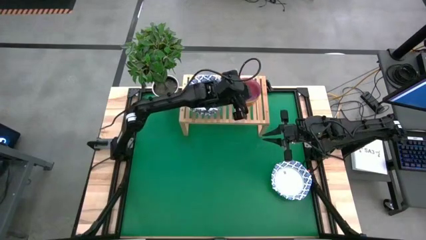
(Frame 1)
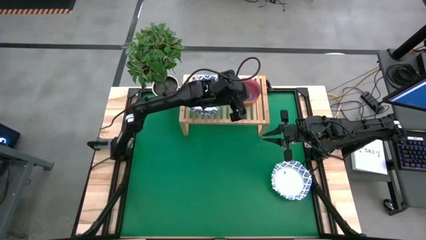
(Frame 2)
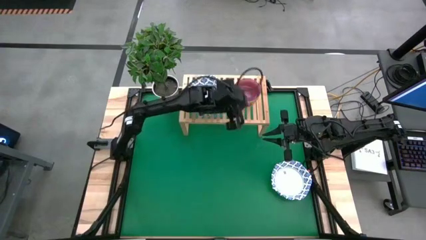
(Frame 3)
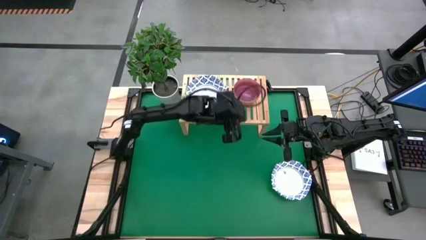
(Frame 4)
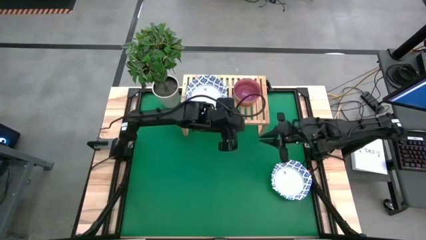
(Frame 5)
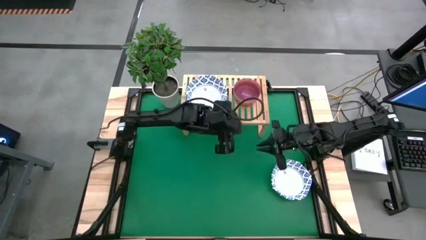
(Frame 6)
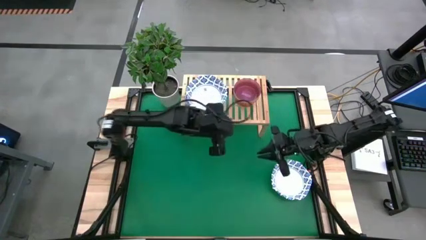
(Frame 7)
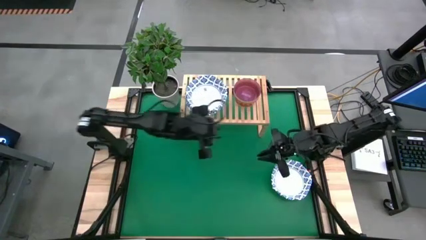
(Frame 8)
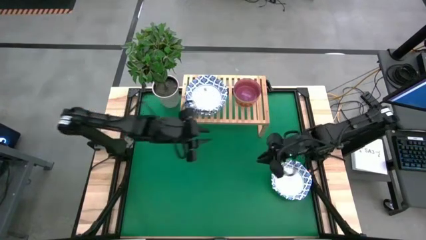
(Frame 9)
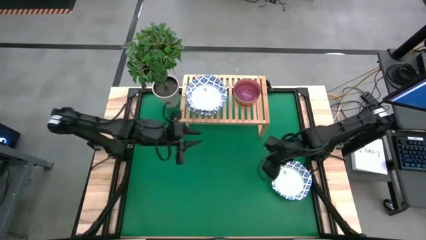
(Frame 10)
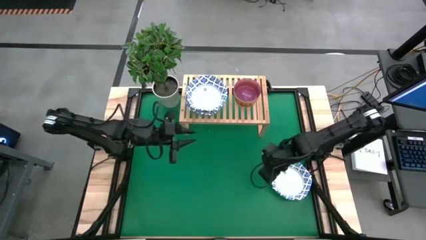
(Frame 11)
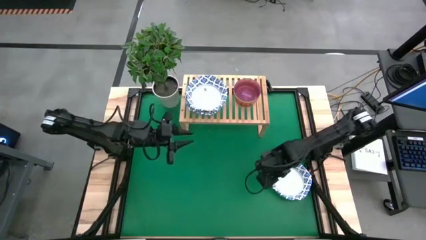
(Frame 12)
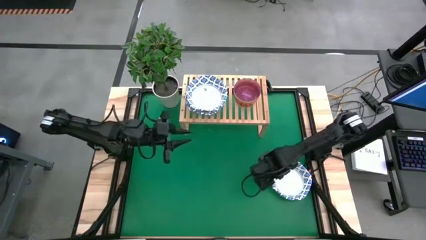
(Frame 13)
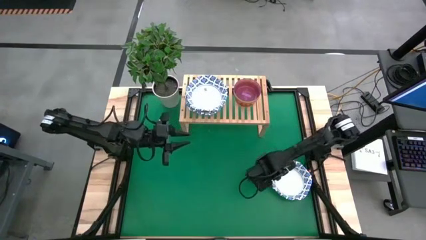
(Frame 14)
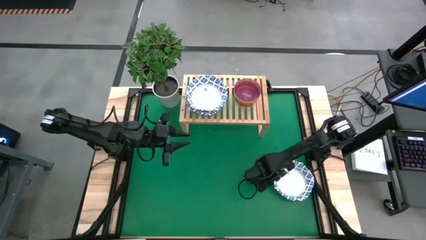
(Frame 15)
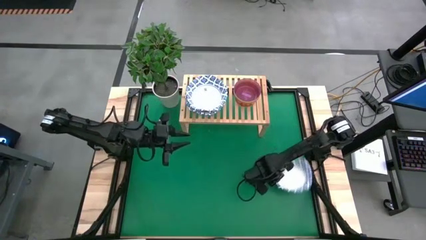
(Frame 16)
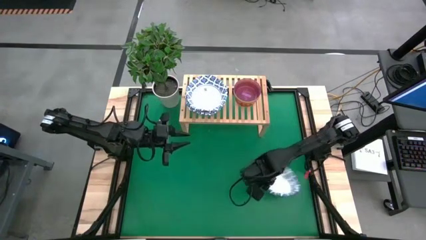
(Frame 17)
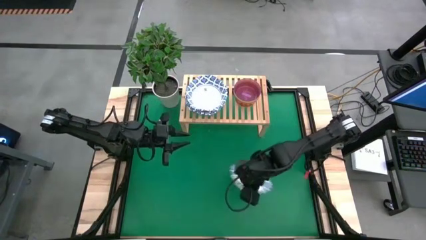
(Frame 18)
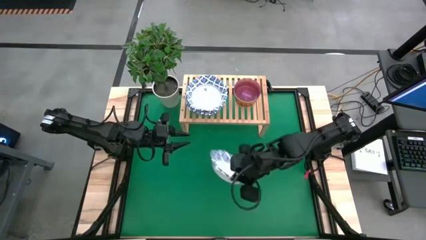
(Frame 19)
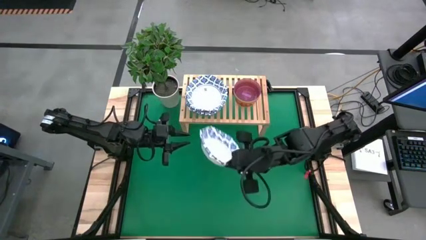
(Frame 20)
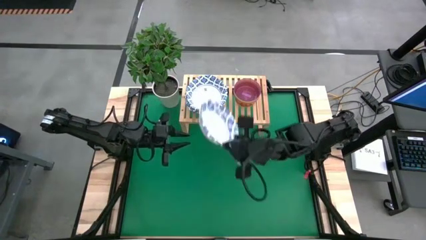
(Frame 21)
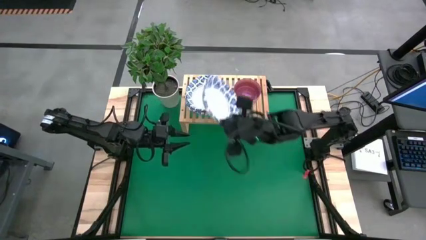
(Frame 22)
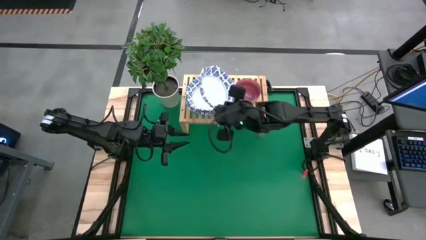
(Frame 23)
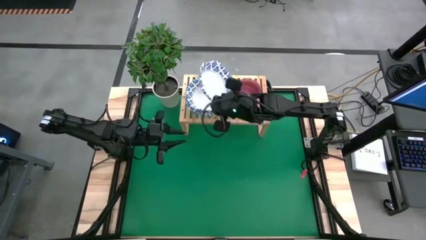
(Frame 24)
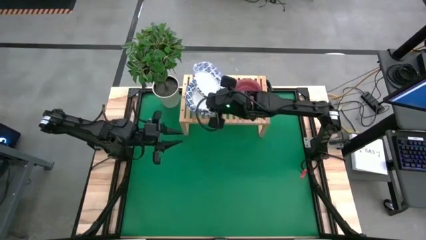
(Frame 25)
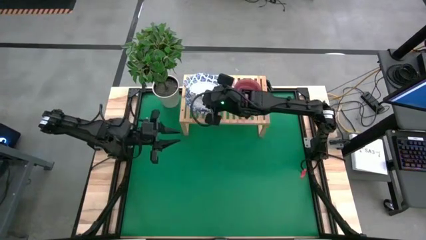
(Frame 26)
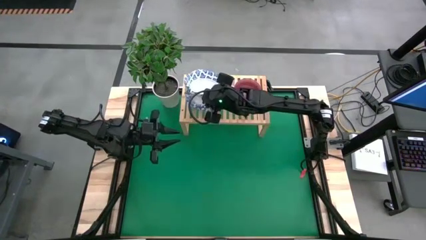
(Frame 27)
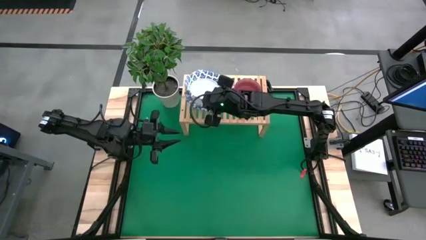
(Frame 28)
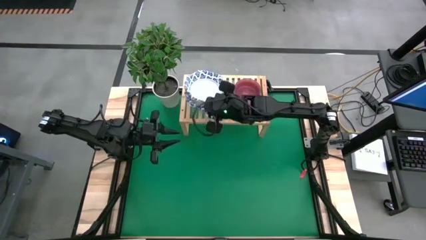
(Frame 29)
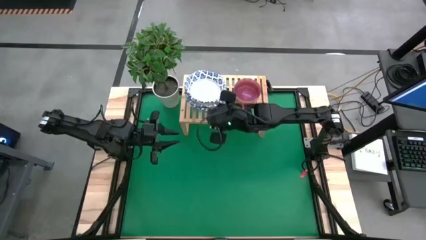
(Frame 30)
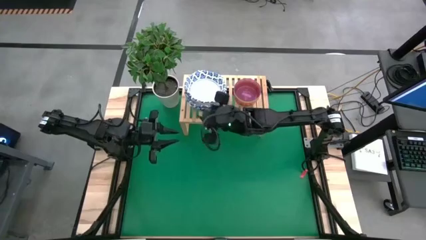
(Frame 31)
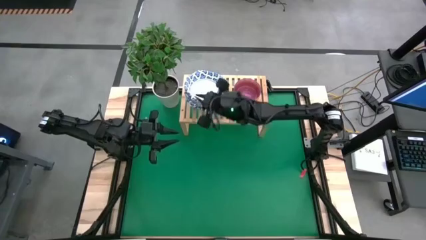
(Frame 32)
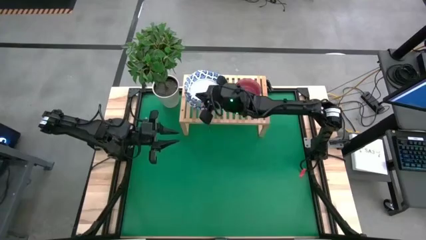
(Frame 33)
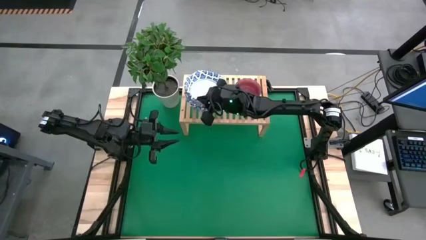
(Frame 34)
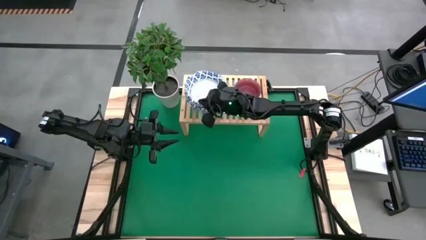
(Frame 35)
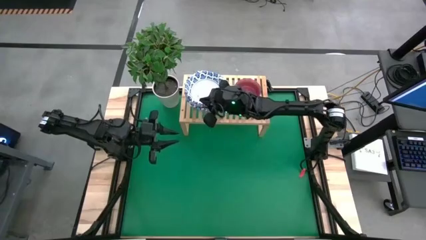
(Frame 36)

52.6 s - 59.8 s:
Task: Place and stack bowls onto a shelf
Stack the white bowl on top of the white bowl

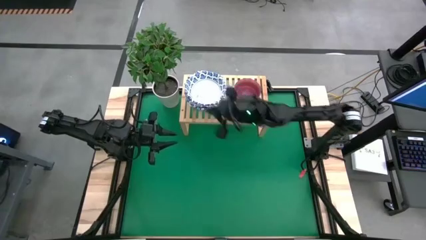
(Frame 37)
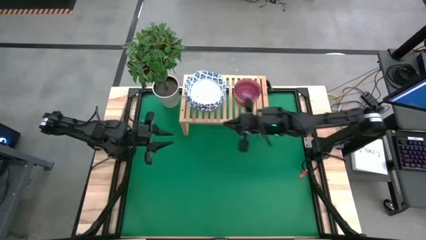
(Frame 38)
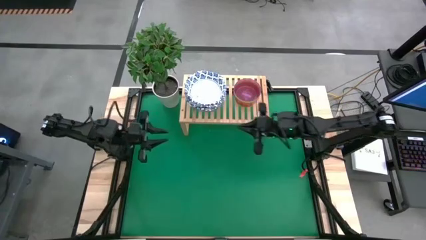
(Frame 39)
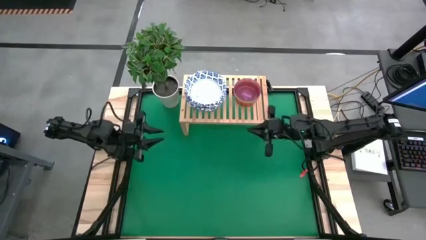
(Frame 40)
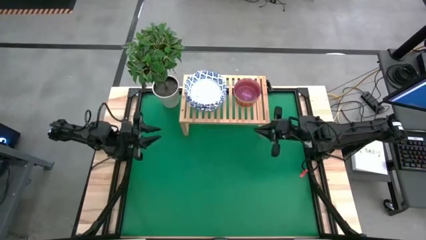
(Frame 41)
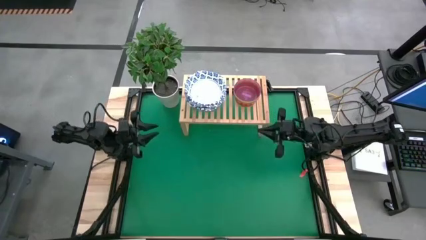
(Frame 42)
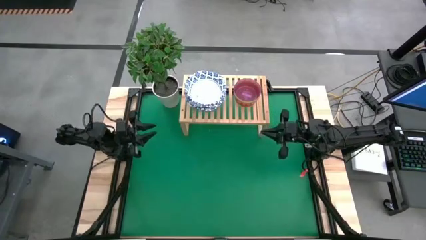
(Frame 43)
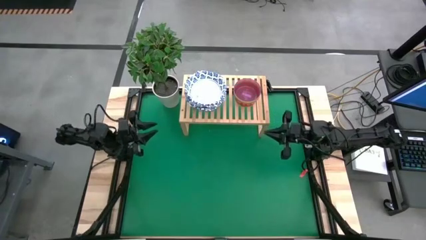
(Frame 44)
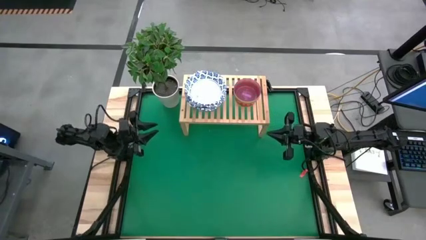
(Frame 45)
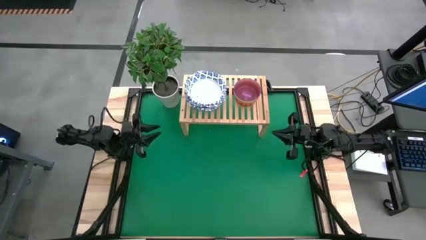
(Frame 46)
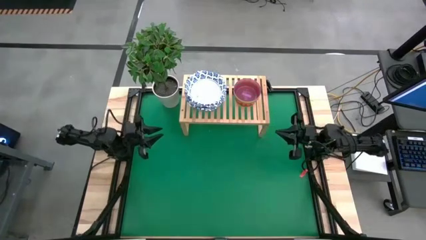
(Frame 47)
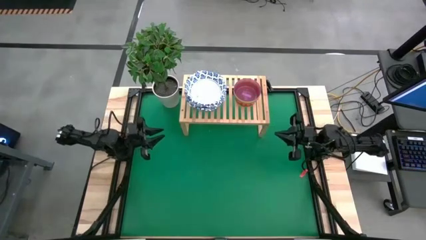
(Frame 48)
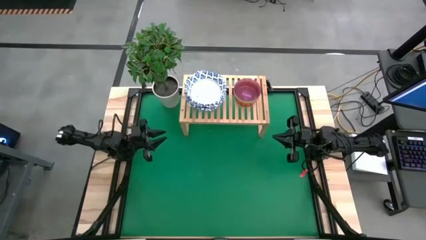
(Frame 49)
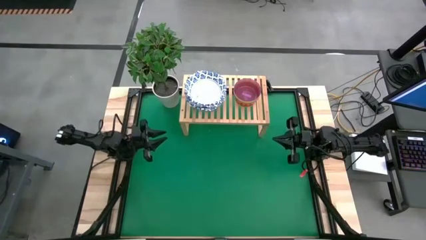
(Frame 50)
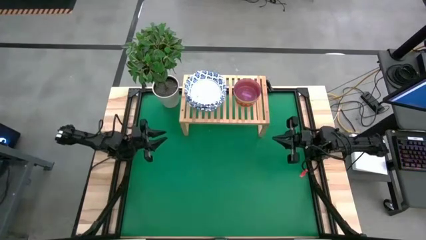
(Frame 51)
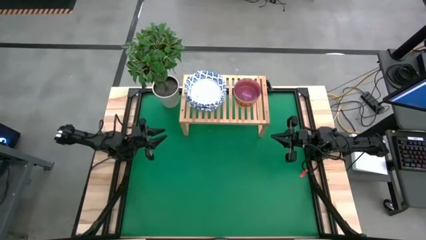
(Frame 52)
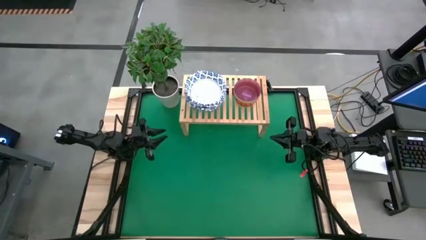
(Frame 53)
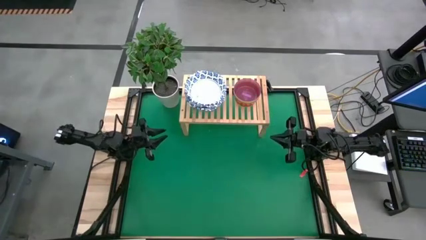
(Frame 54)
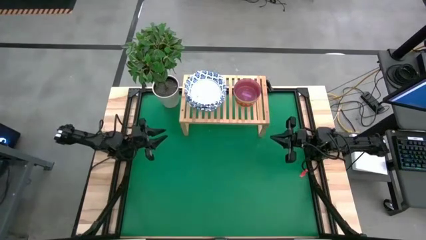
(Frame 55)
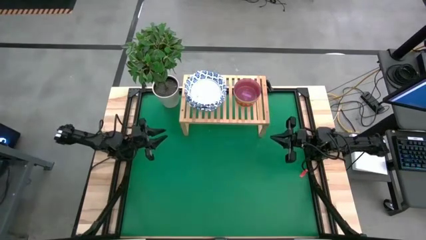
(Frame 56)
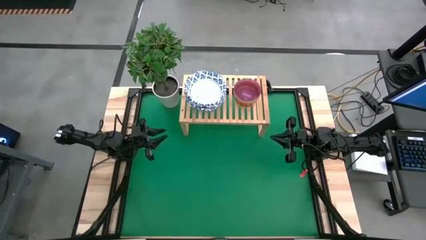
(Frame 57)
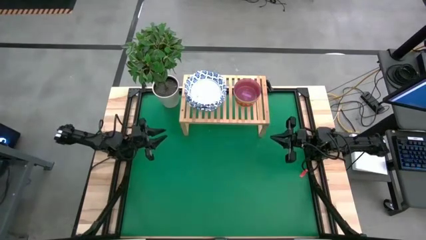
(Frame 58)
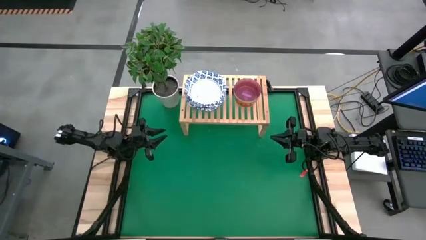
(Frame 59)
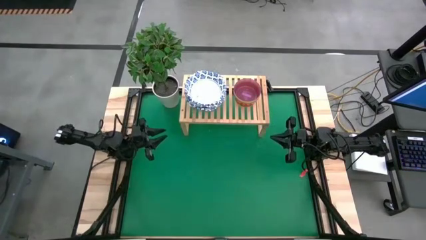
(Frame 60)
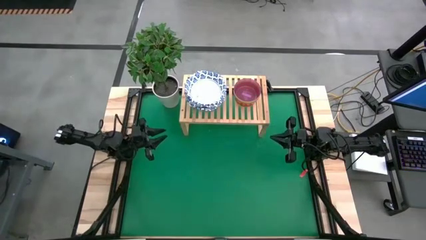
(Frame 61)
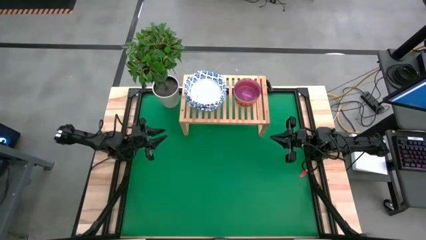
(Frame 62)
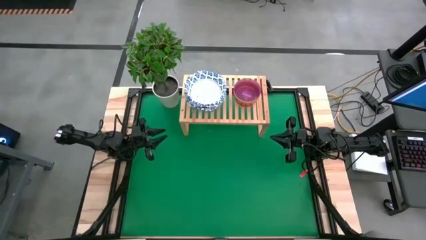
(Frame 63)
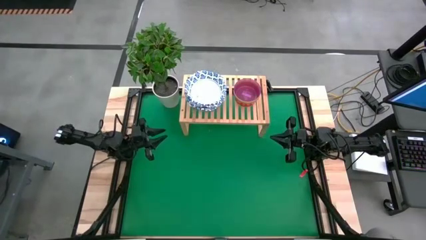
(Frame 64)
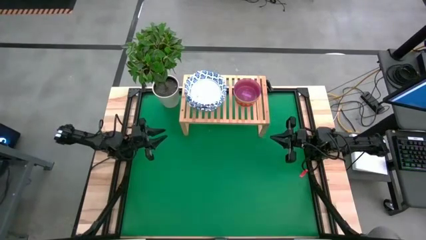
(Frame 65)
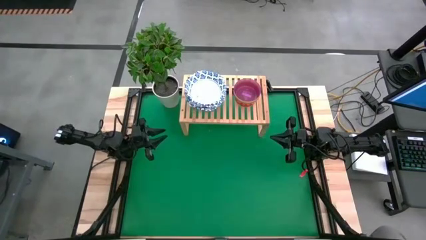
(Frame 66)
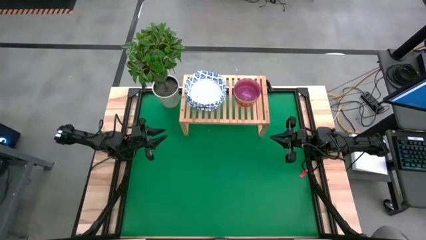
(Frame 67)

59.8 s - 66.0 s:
Return to Home Position

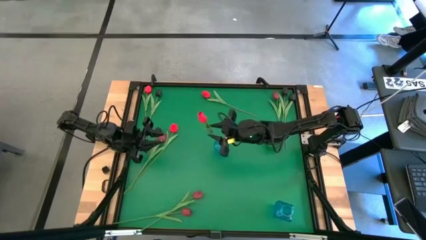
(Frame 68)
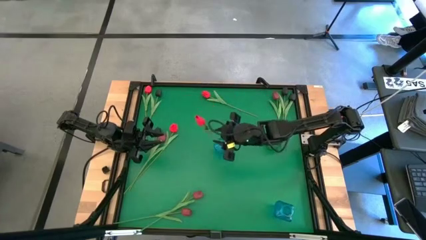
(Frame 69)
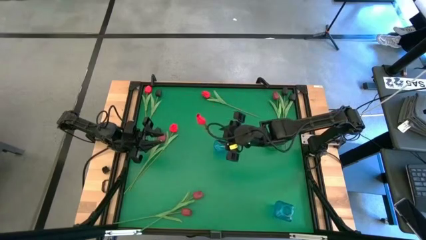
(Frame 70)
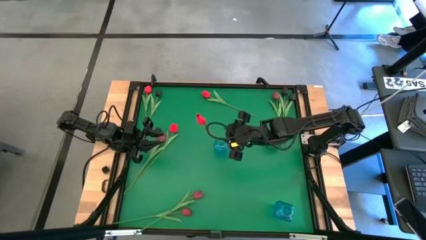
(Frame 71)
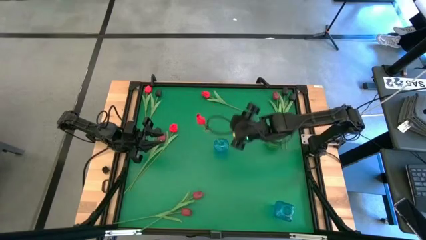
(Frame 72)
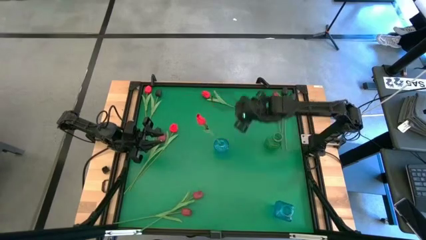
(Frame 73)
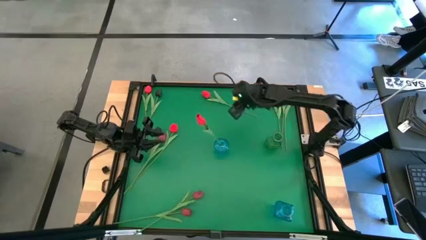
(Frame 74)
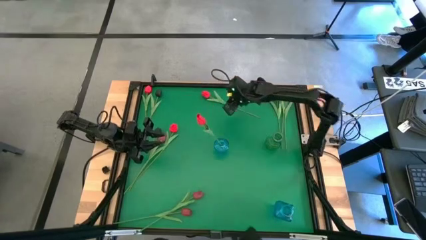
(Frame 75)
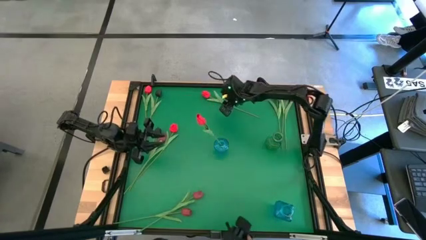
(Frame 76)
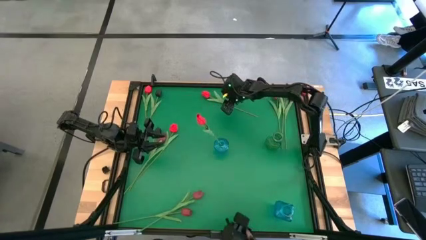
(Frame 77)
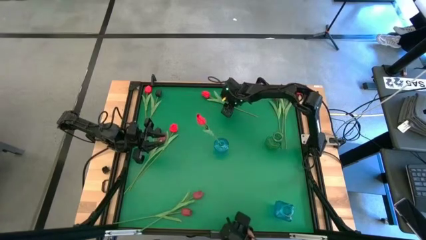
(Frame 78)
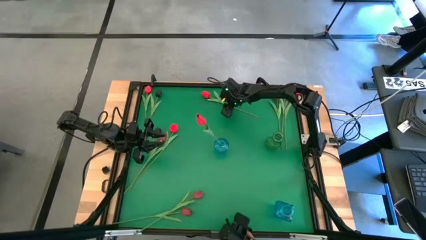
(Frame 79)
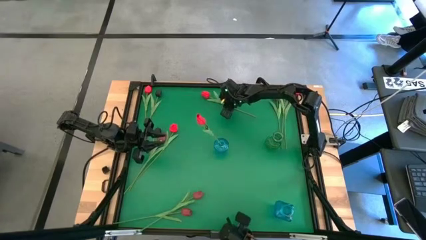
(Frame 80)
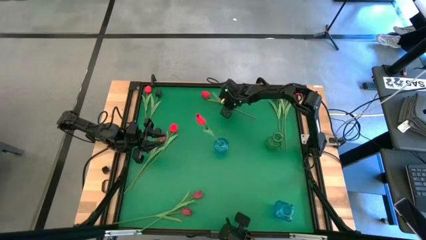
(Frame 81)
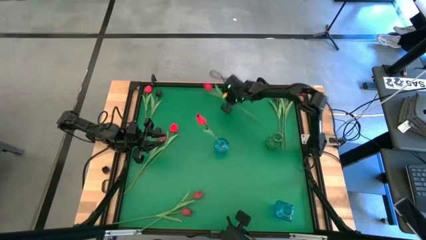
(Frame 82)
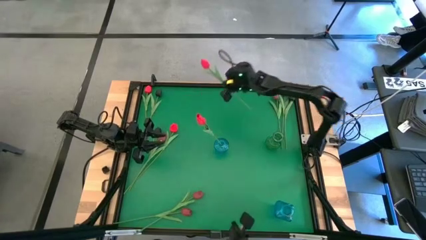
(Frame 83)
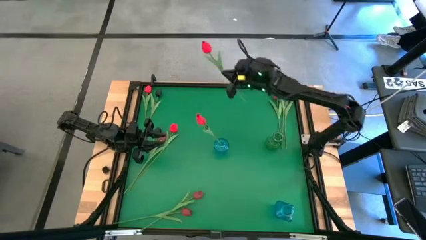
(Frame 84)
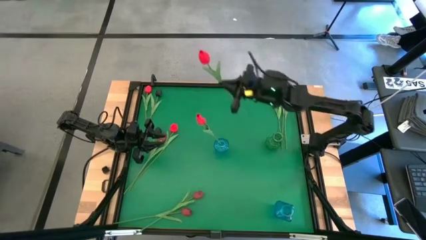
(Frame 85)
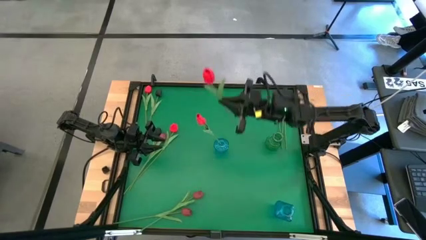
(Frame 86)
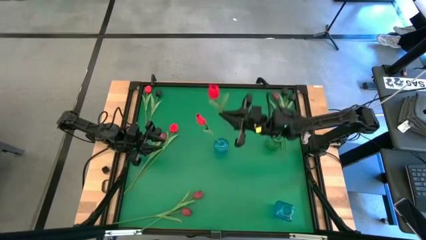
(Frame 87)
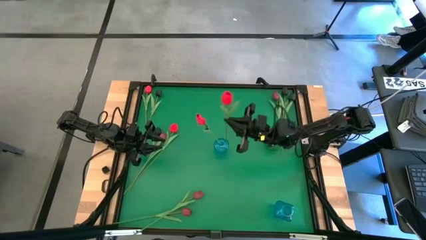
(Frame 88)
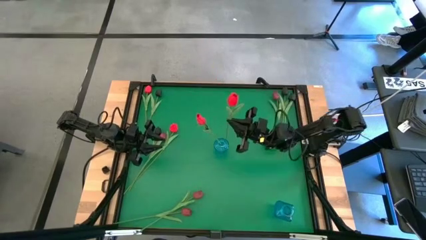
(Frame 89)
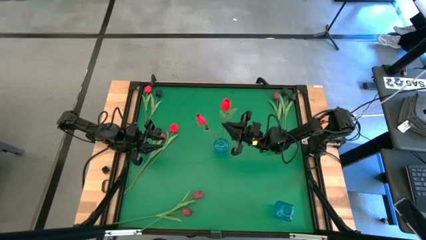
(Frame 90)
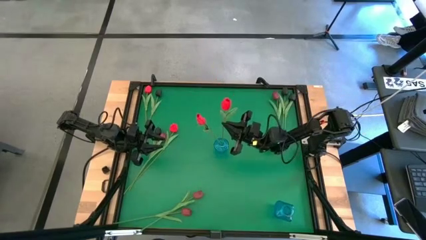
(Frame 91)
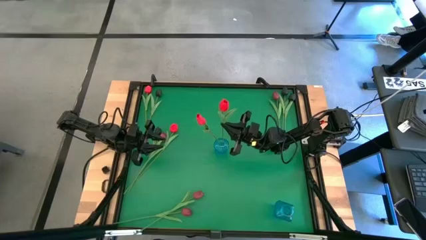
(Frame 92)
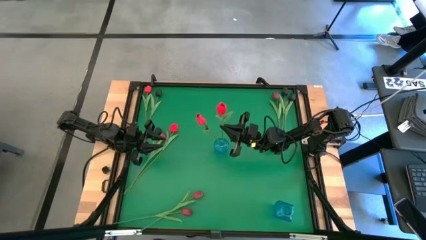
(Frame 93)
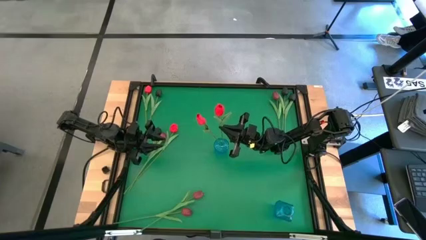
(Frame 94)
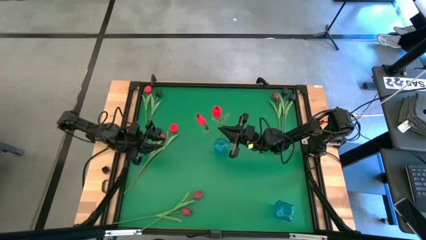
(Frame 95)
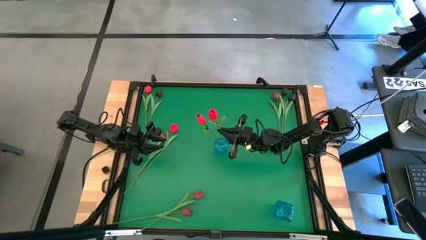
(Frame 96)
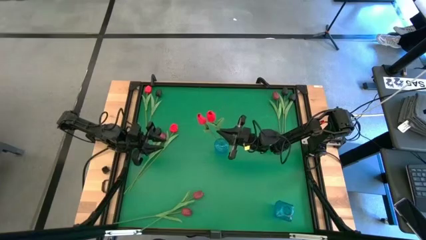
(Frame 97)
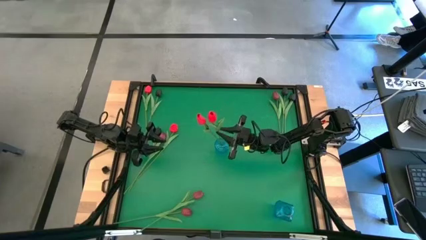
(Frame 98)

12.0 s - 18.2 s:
Task: Sort flowers into vase by color
Put the red flower in the top blue vase
